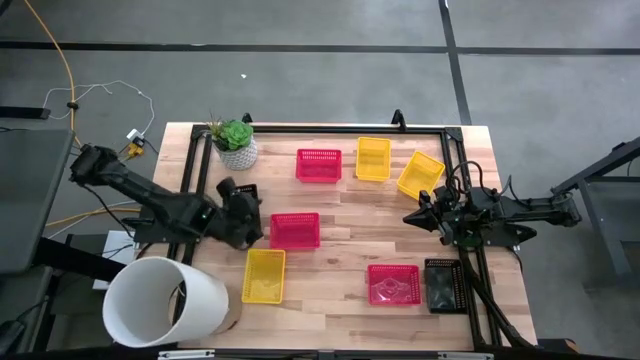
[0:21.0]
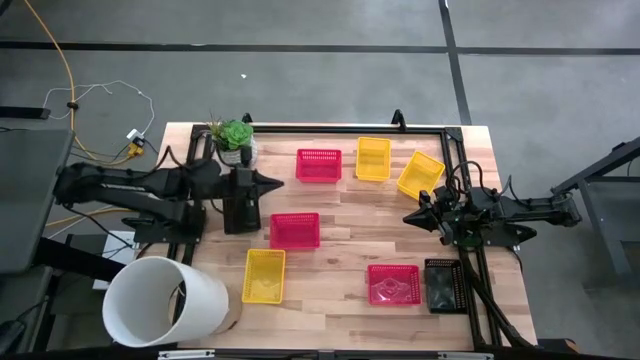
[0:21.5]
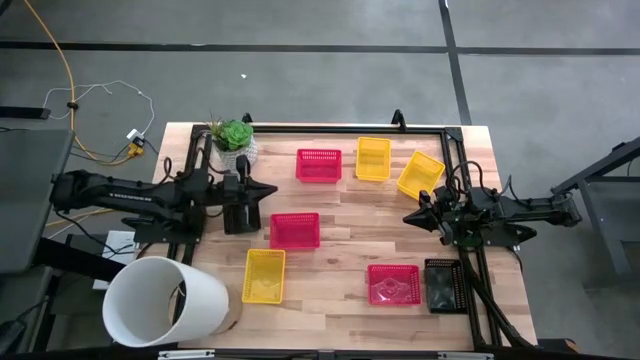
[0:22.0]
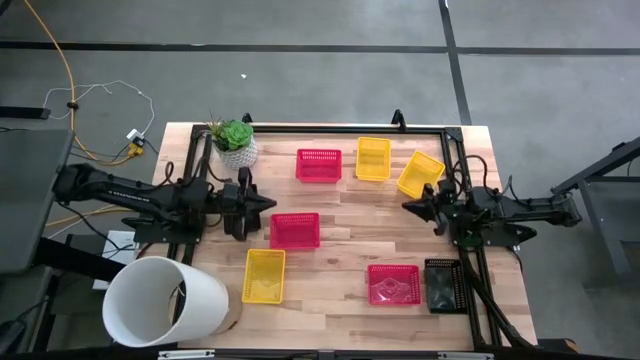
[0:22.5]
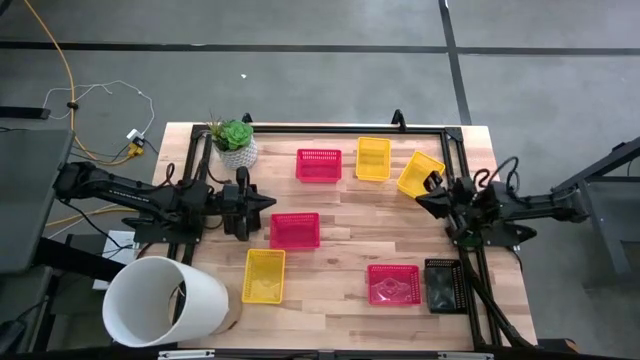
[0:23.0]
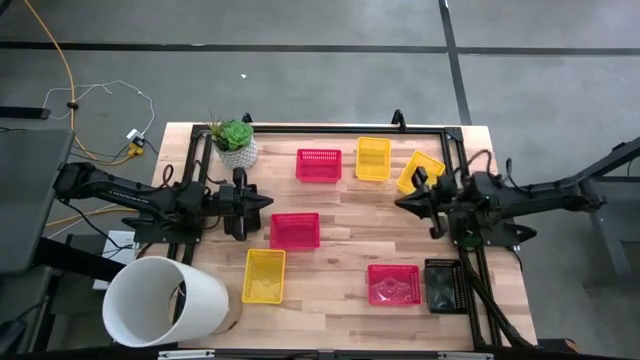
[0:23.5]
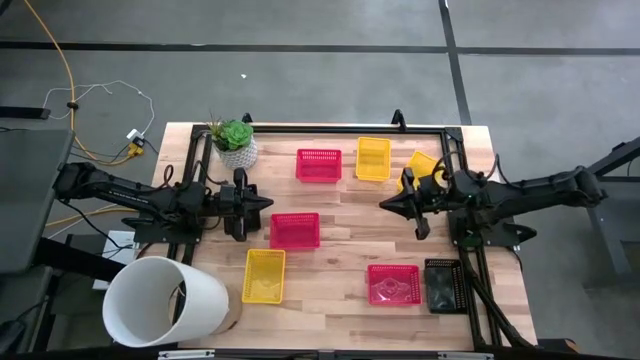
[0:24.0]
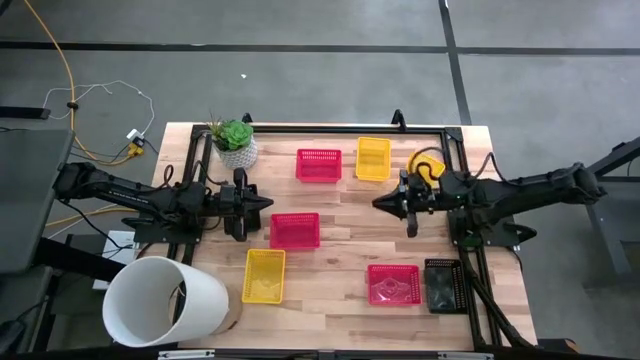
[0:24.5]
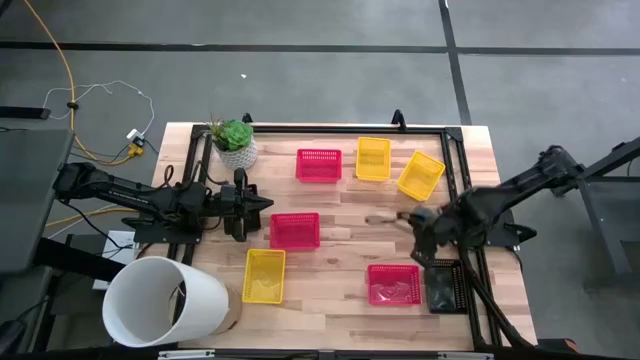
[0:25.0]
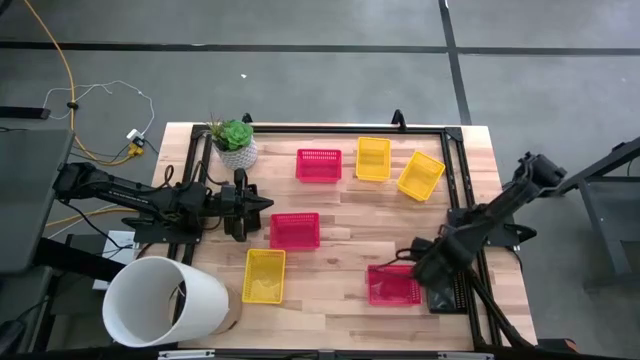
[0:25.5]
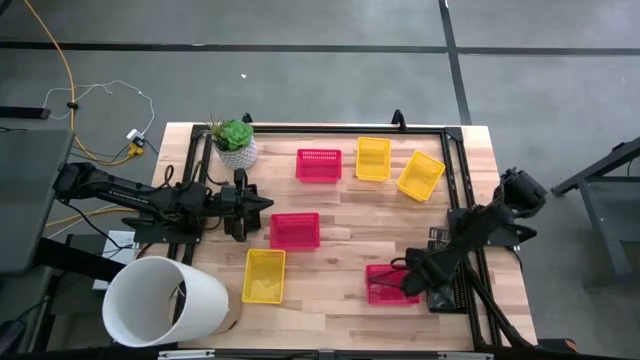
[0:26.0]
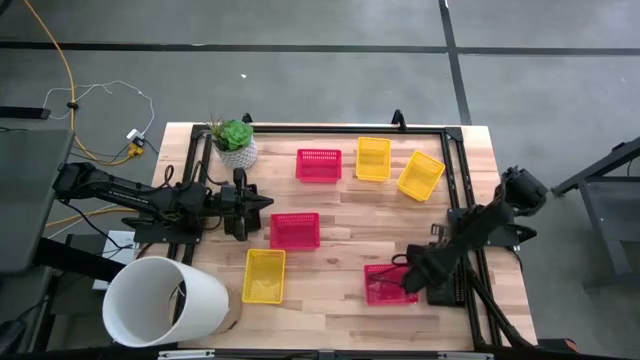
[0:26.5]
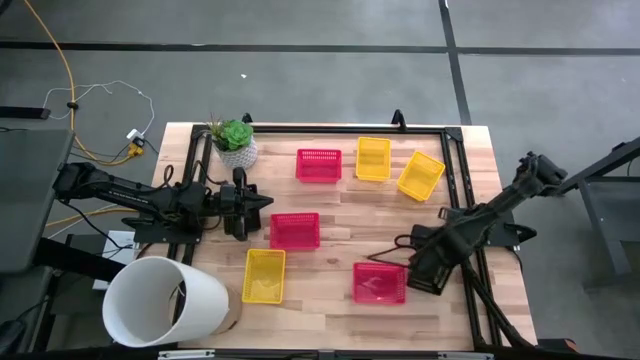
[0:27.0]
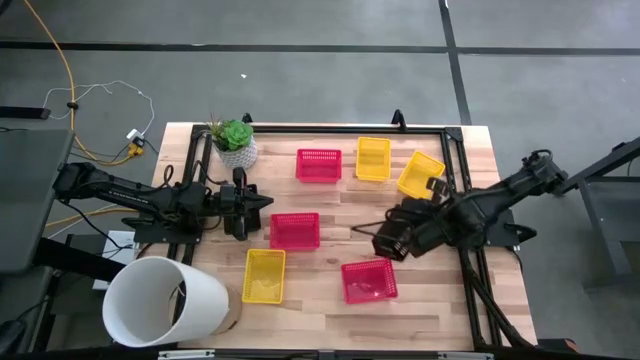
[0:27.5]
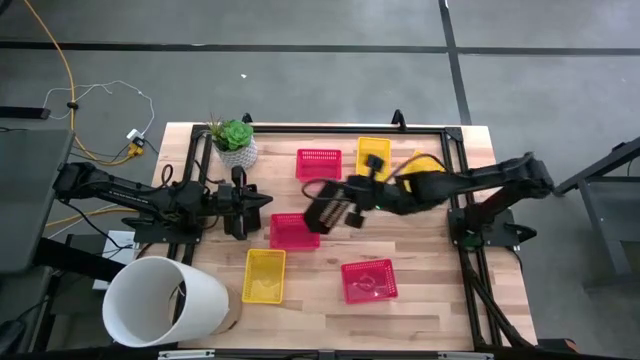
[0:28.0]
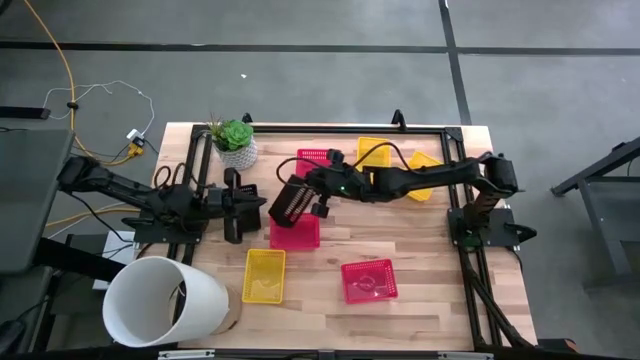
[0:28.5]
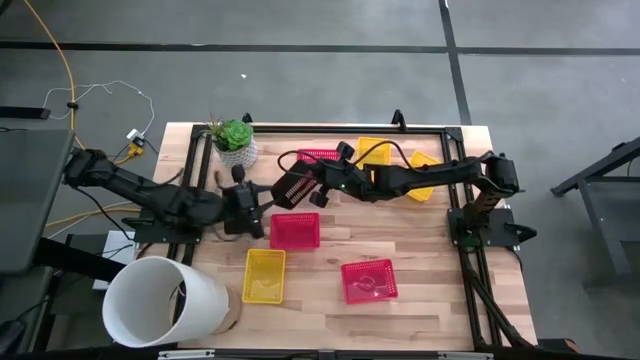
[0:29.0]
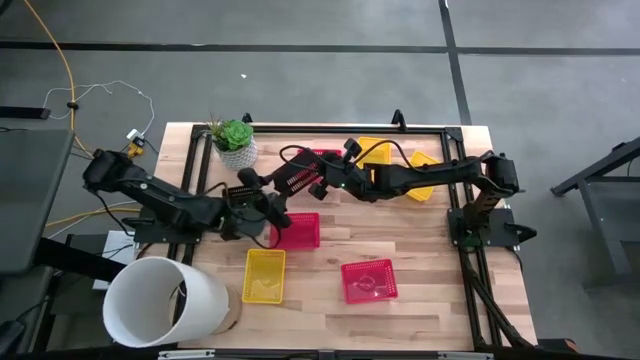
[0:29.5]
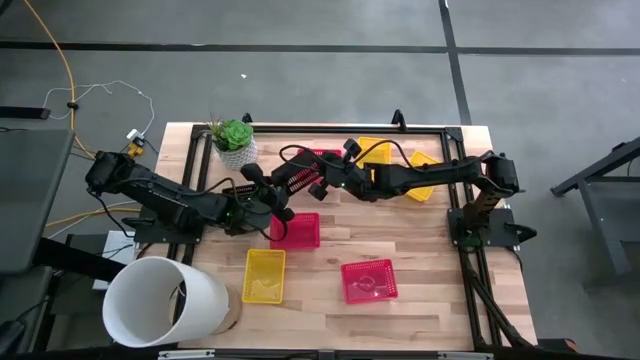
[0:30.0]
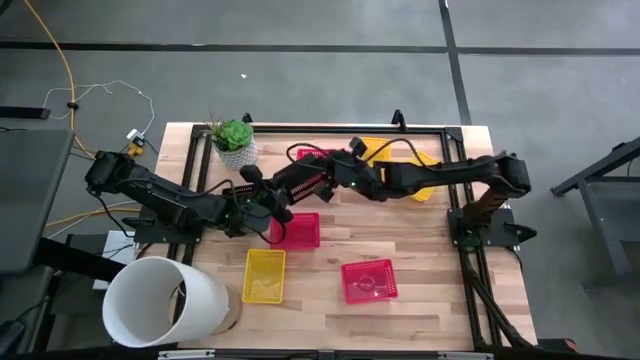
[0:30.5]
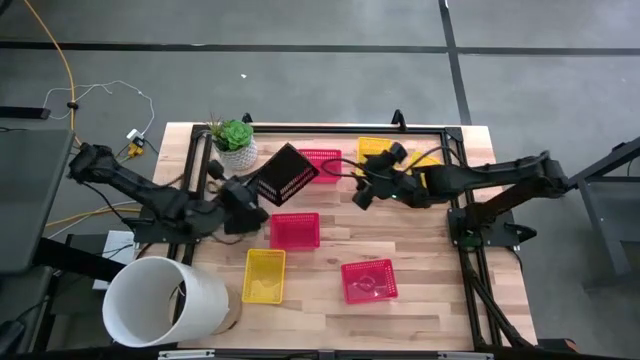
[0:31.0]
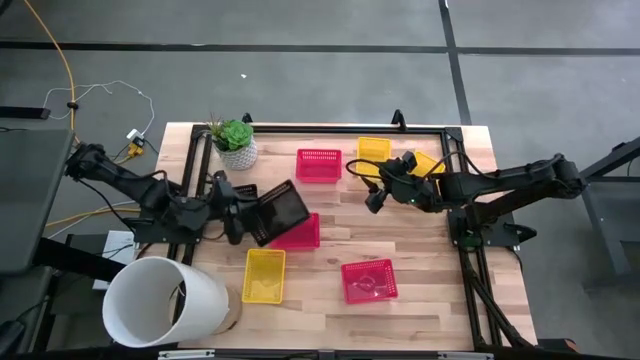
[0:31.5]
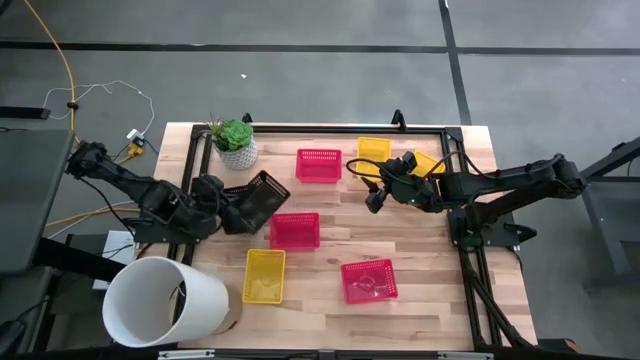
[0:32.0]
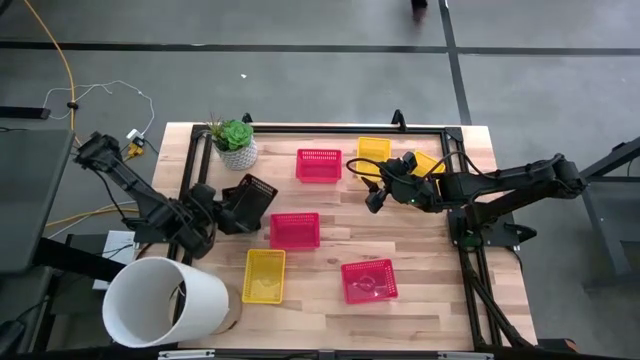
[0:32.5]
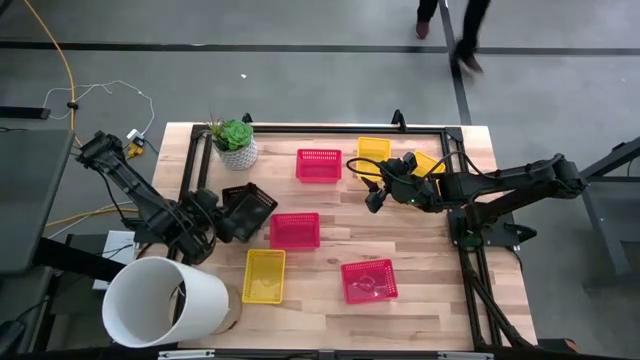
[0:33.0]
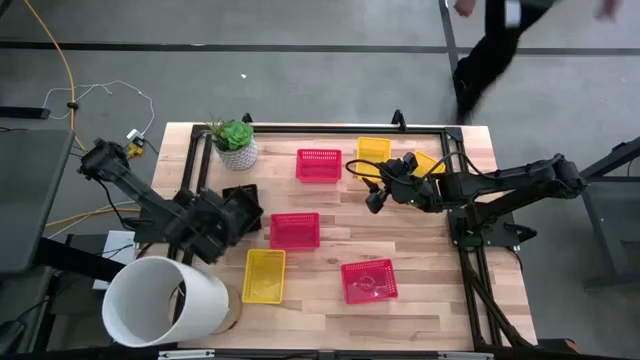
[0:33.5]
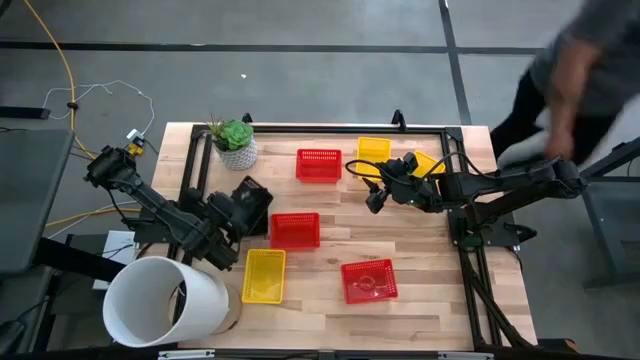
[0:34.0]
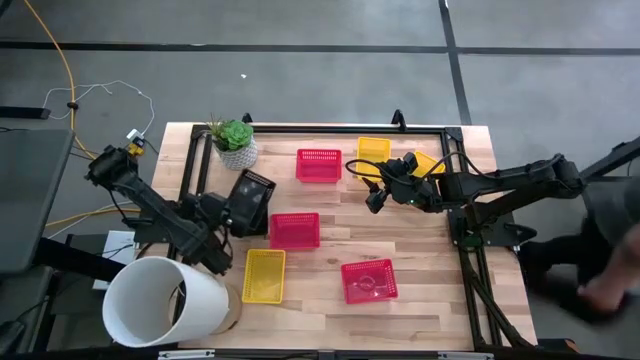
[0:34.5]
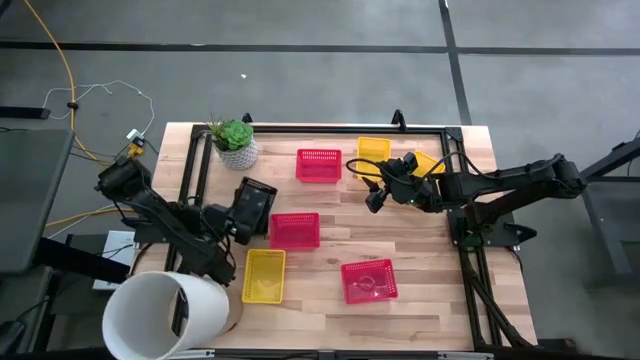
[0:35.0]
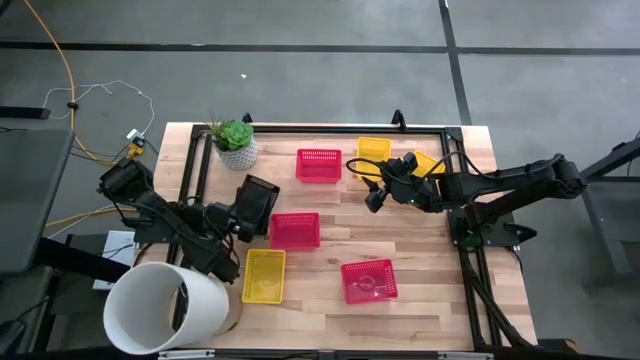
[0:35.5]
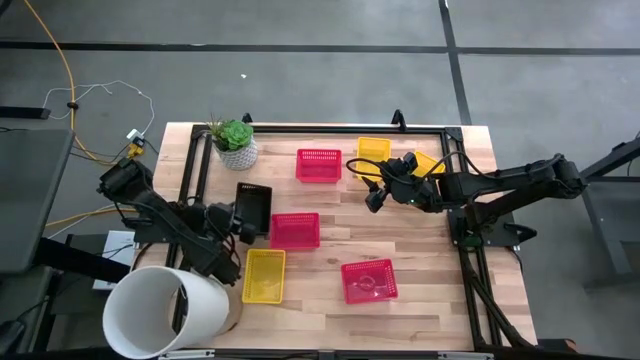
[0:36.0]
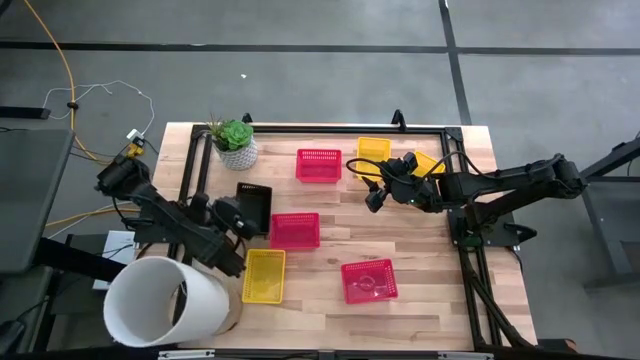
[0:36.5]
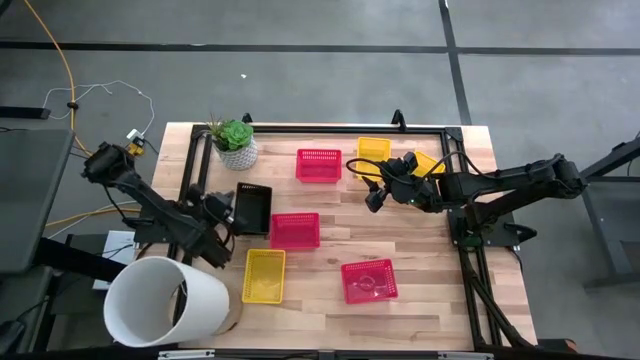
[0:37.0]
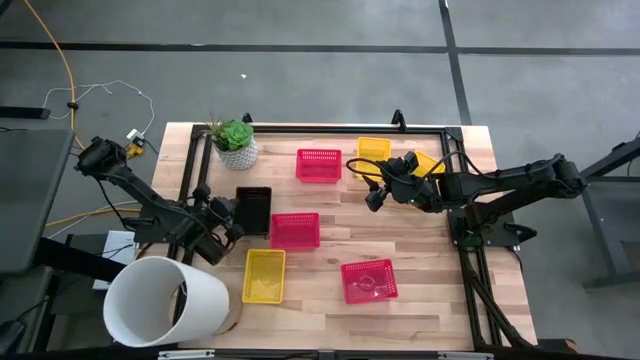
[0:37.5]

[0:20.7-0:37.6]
Stack the bottom black bin on top of the top black bins

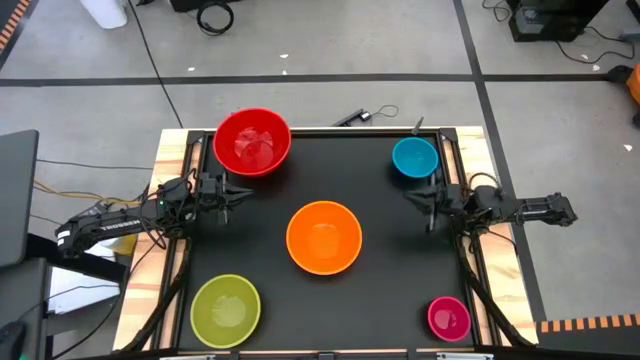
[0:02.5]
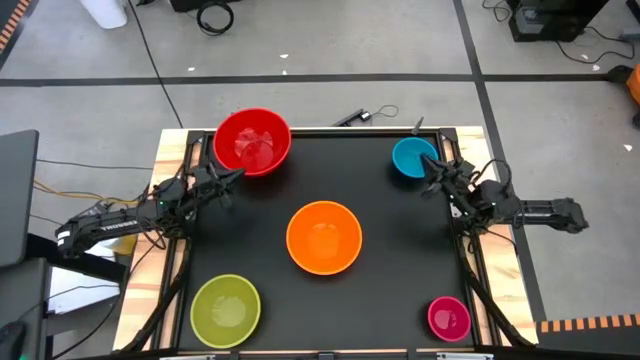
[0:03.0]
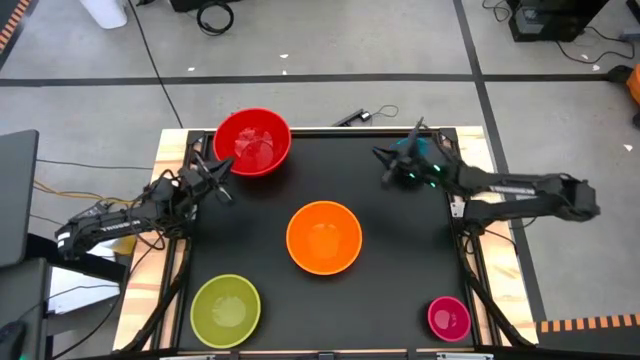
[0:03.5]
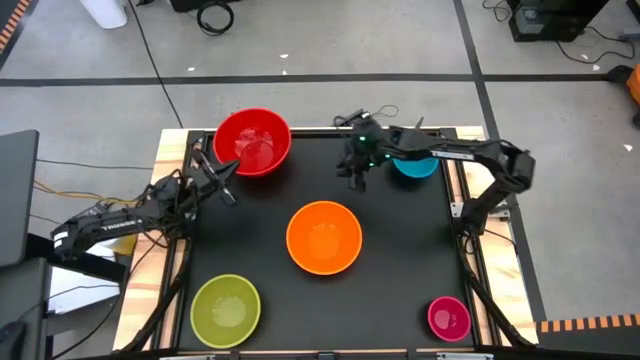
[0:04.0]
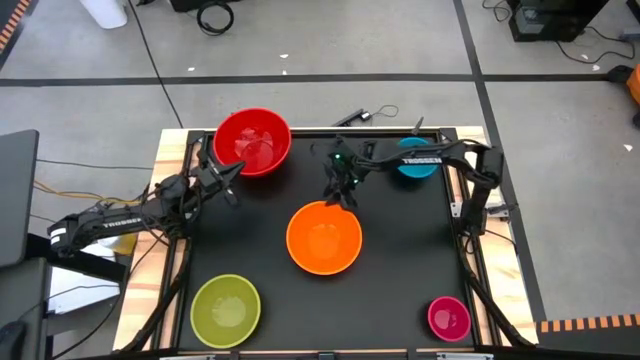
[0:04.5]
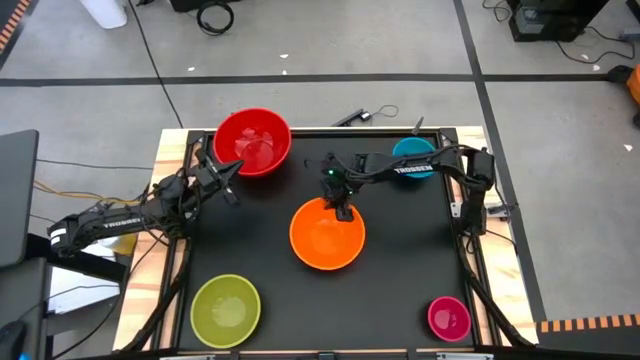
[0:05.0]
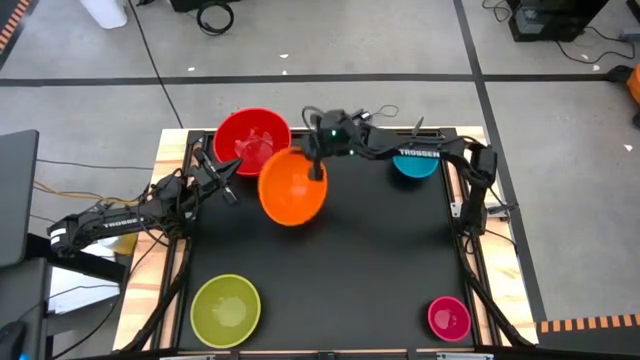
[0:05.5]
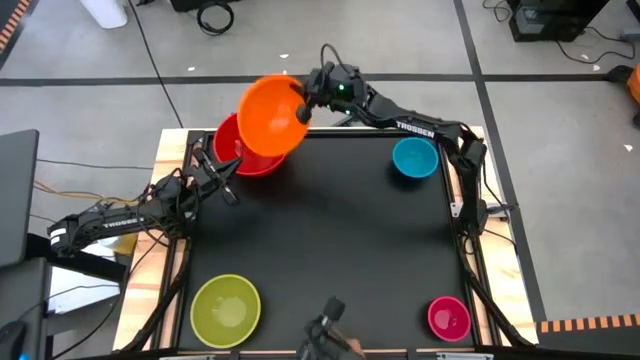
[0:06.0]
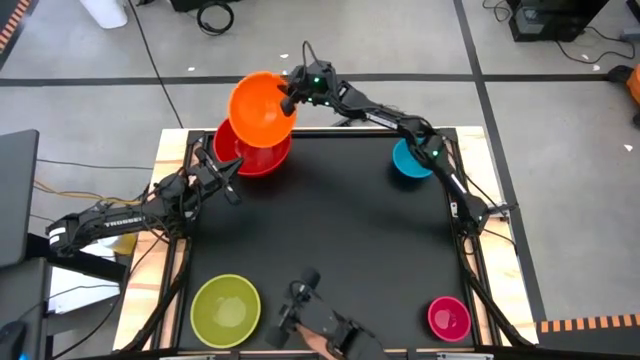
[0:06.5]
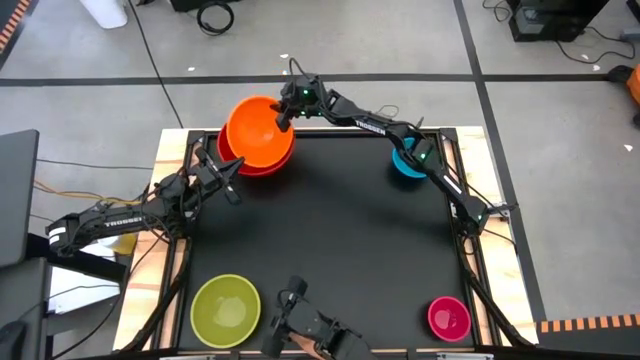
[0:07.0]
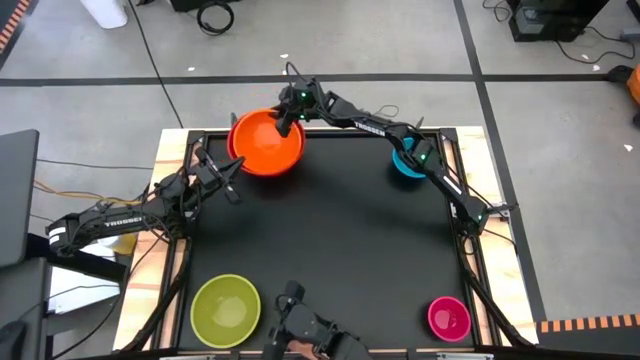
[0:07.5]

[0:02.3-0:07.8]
Stack the orange bowl on top of the red bowl

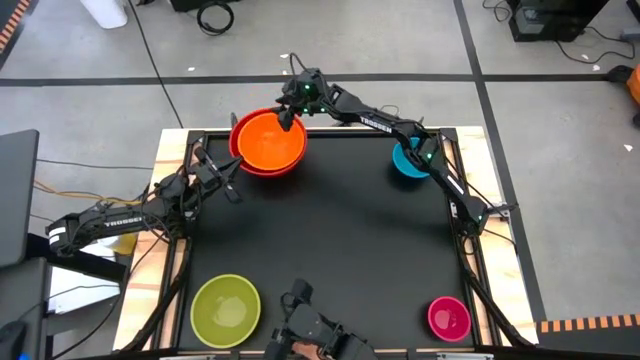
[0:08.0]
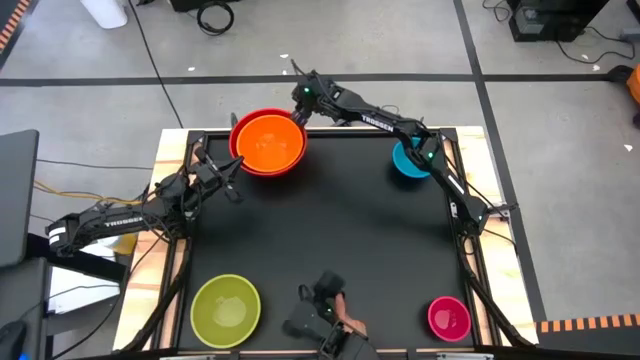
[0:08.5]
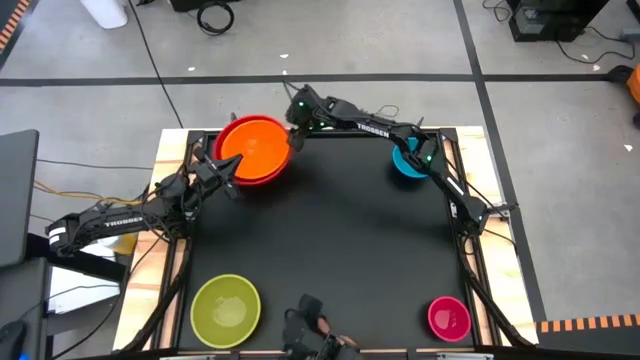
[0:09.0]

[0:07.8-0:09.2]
Adjust the stacked bowls
